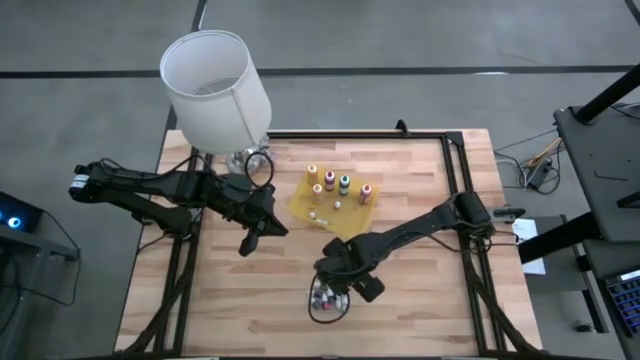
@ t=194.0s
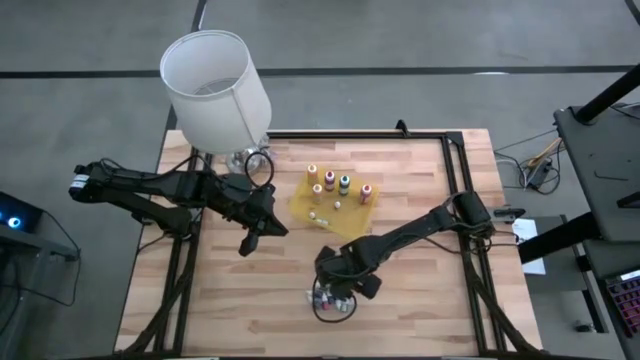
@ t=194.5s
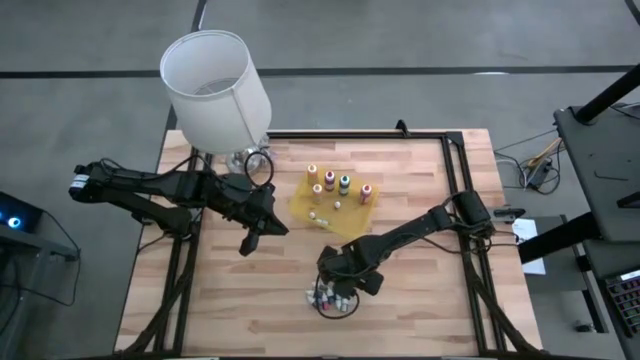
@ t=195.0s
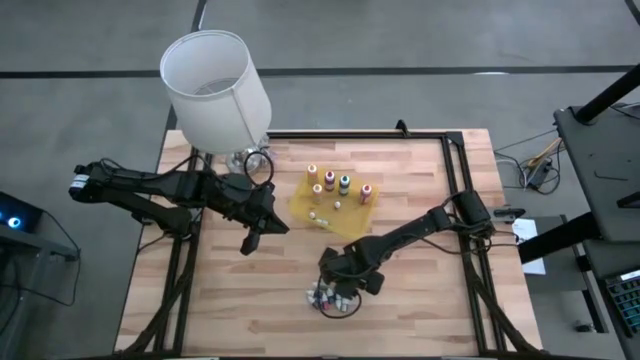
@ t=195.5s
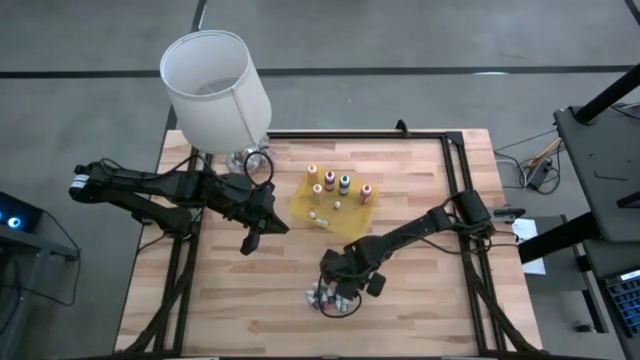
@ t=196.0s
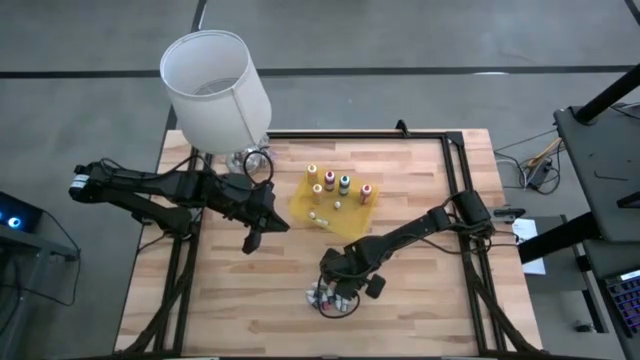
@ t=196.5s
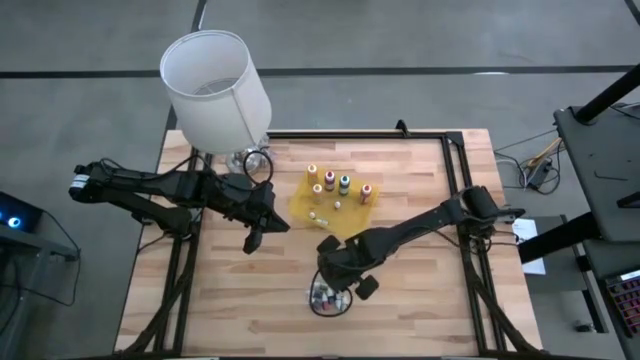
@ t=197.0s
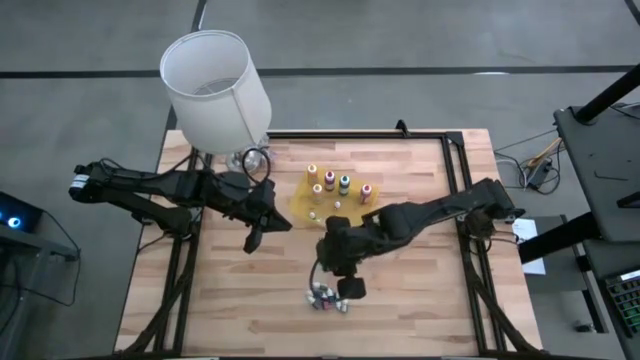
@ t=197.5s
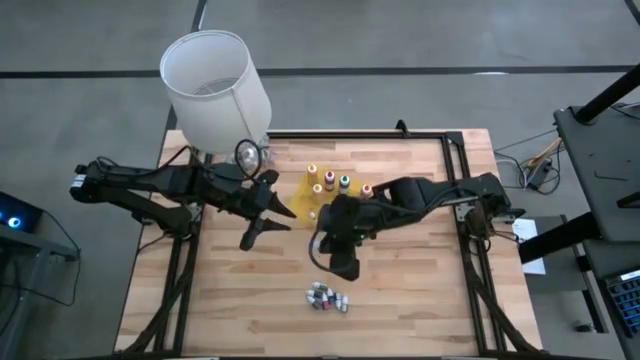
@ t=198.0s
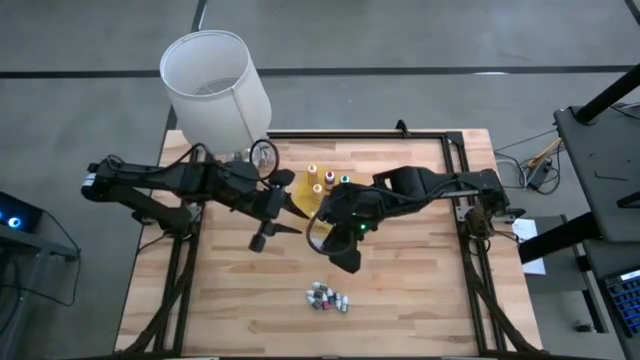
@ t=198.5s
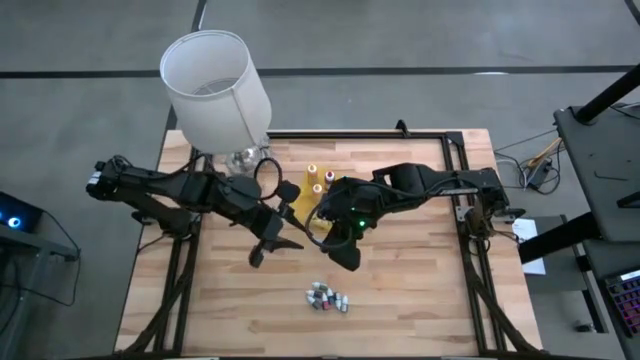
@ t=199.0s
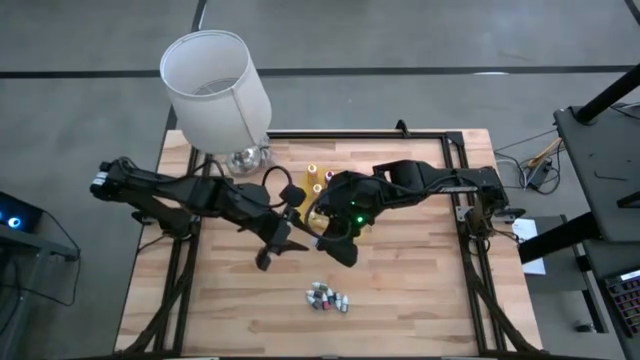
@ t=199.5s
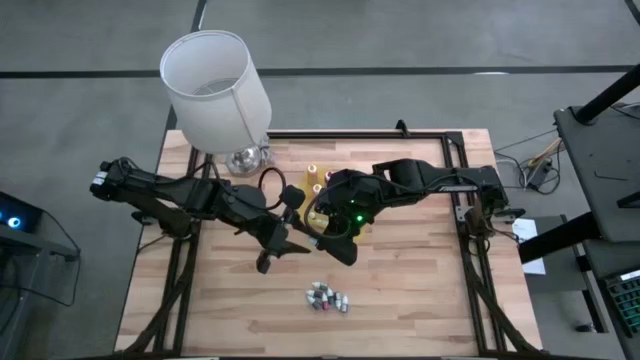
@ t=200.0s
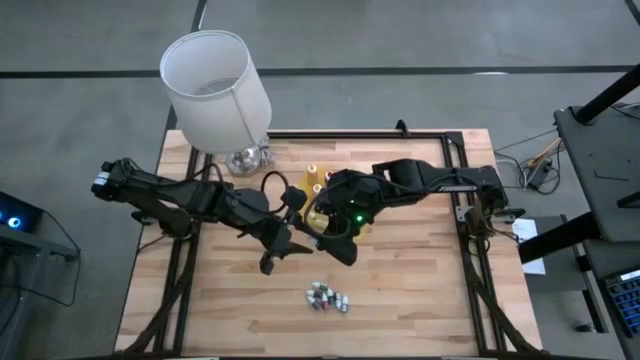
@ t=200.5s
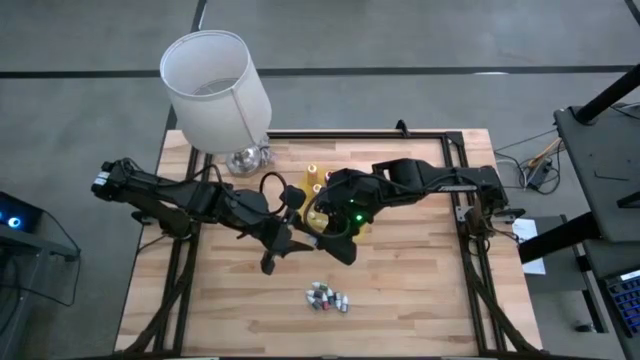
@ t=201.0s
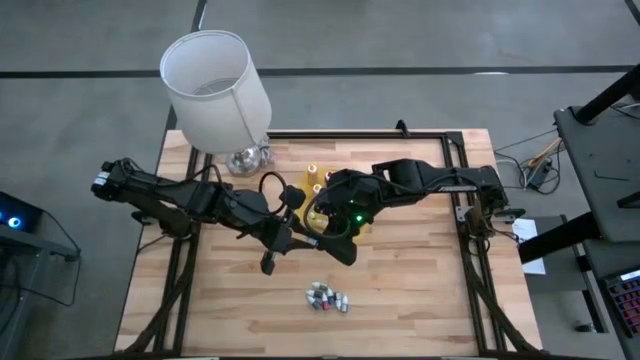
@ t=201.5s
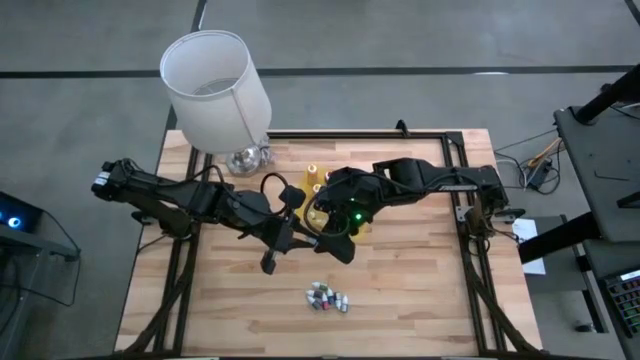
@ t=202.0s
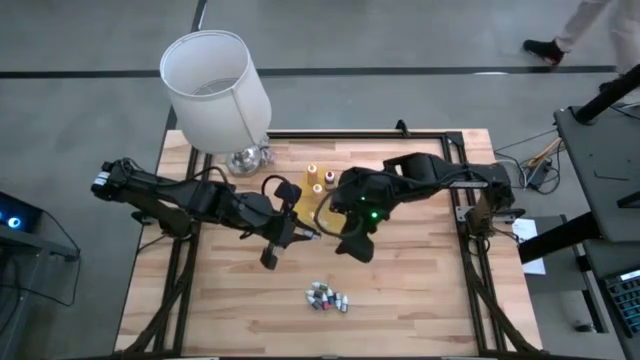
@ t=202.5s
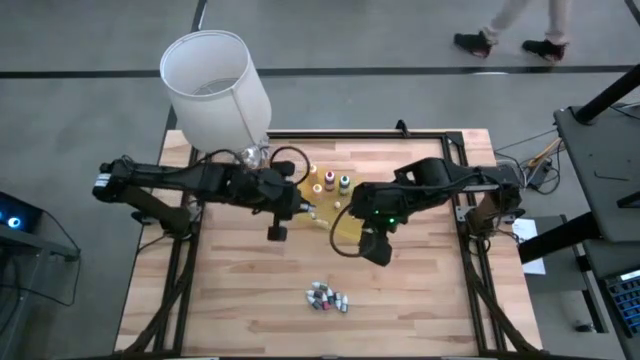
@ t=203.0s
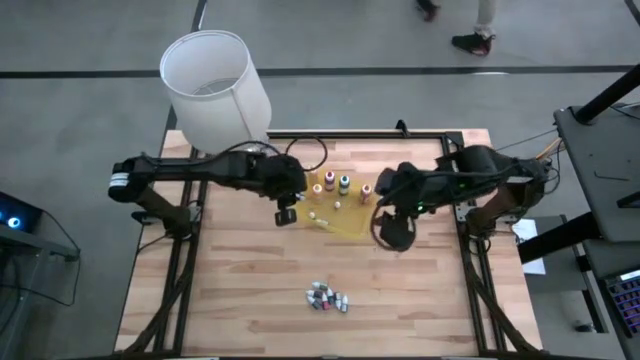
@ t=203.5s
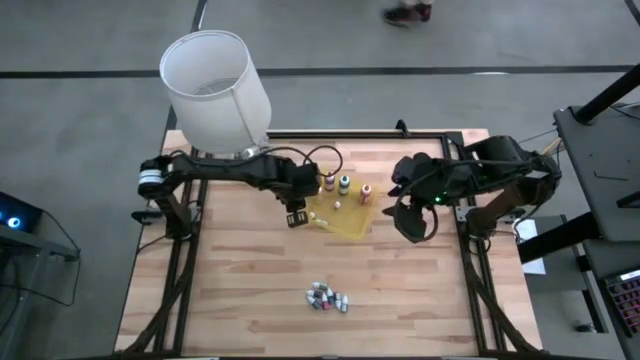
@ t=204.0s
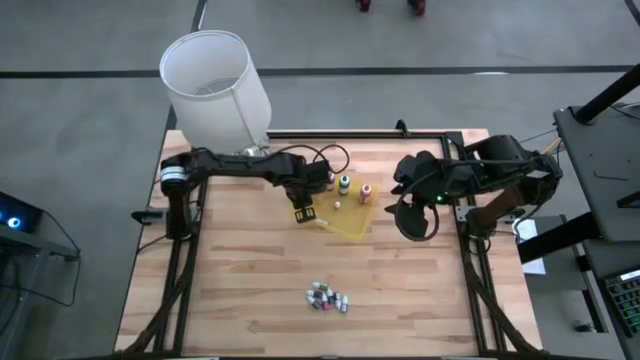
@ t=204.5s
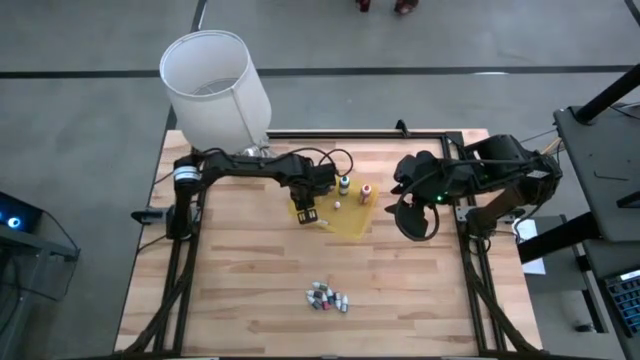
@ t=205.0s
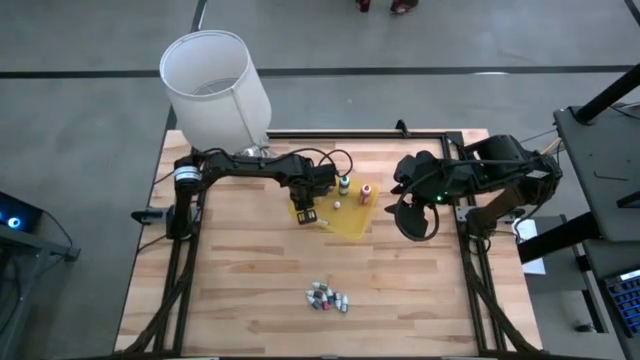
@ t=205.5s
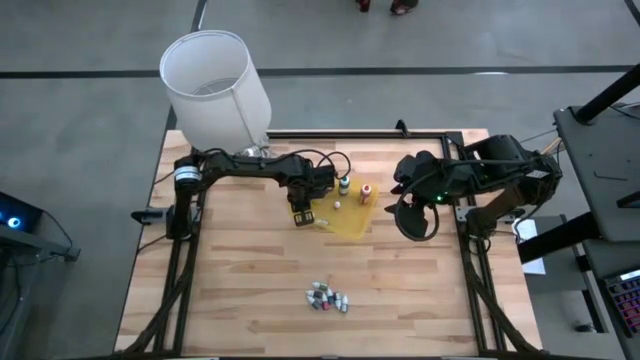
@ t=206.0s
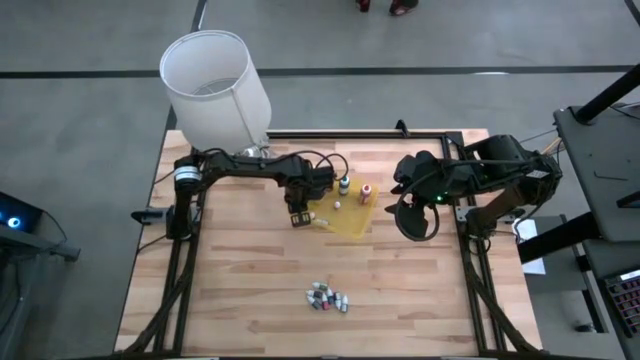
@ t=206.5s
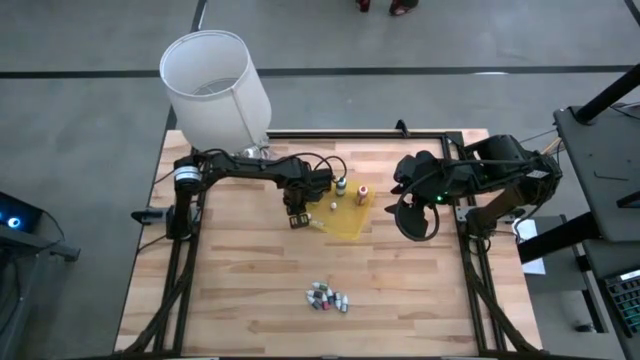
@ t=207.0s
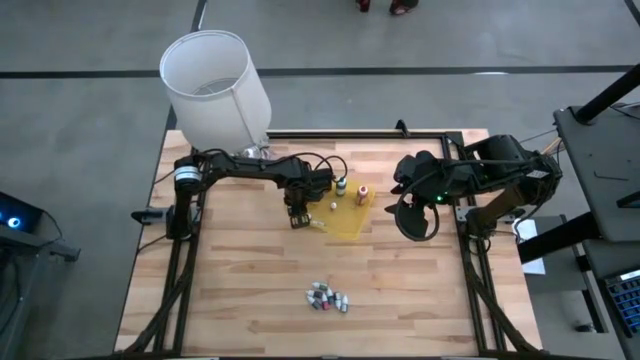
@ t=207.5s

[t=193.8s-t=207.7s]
Task: Pick & Place food coloring
Put the small purple food coloring bottle into the yellow bin

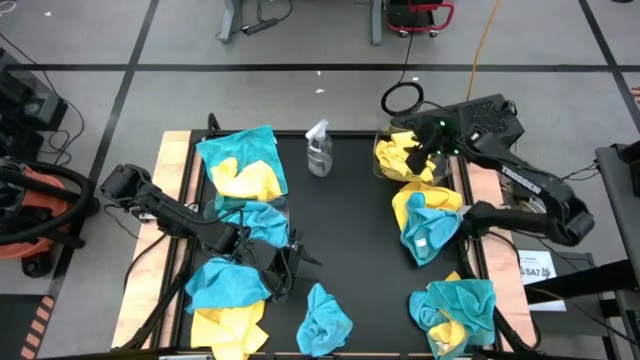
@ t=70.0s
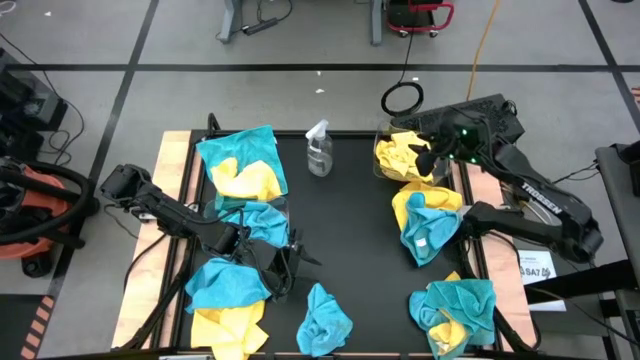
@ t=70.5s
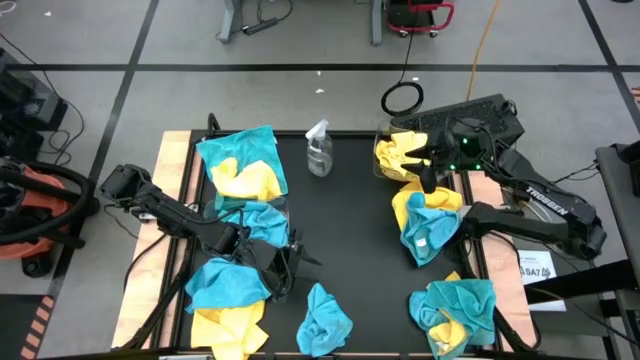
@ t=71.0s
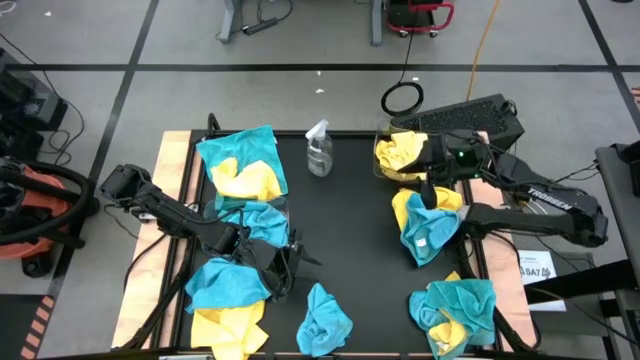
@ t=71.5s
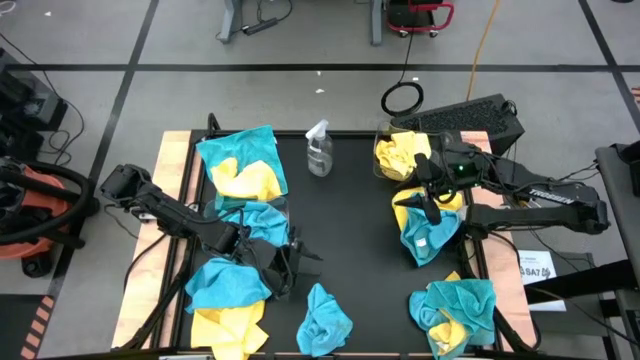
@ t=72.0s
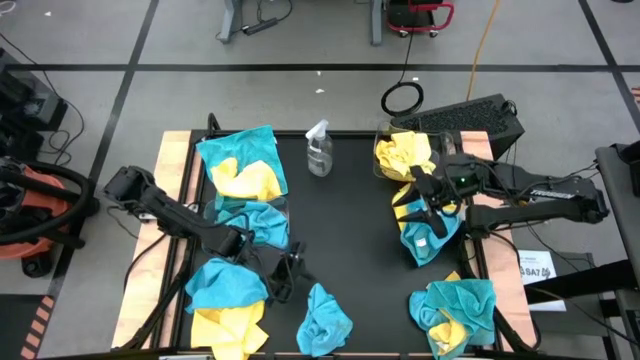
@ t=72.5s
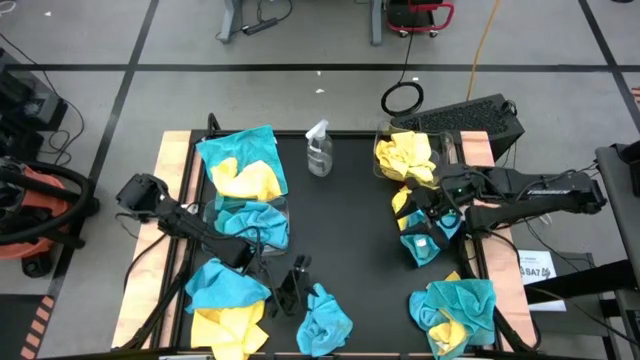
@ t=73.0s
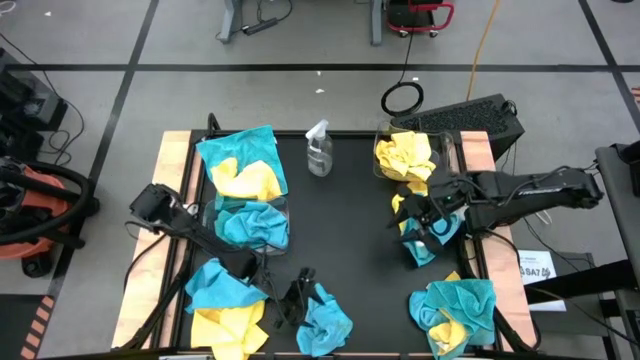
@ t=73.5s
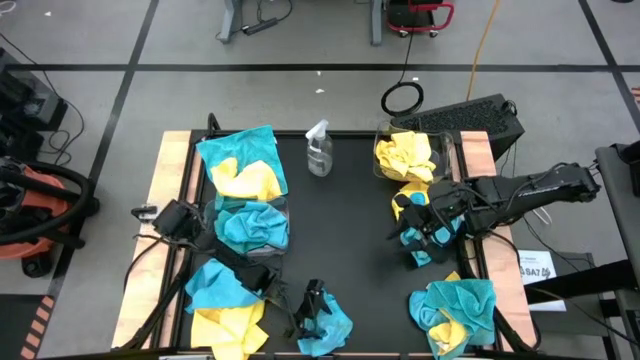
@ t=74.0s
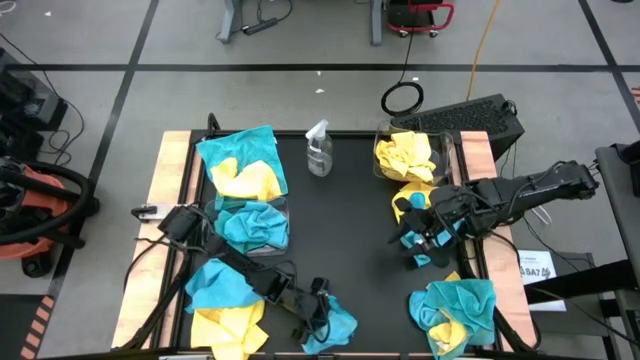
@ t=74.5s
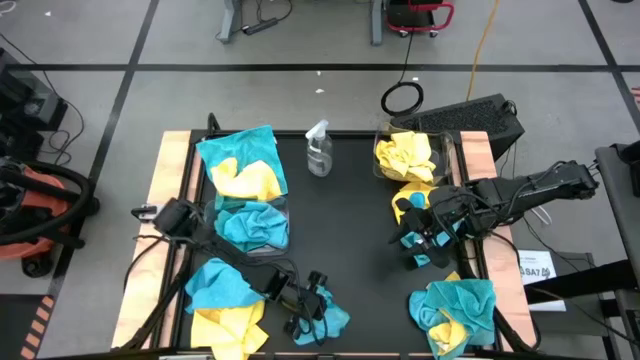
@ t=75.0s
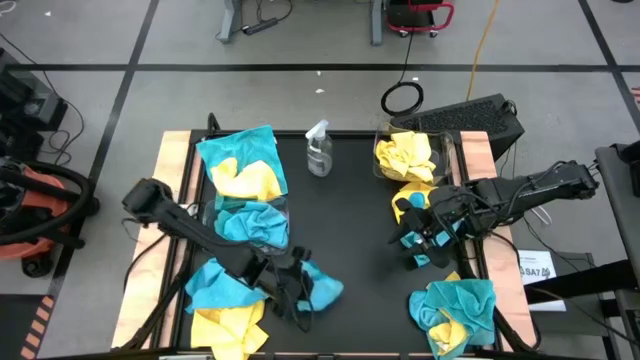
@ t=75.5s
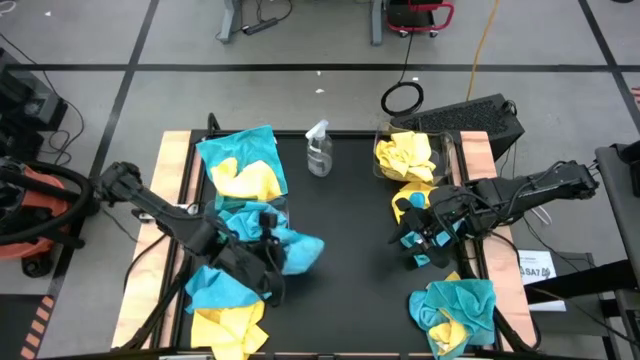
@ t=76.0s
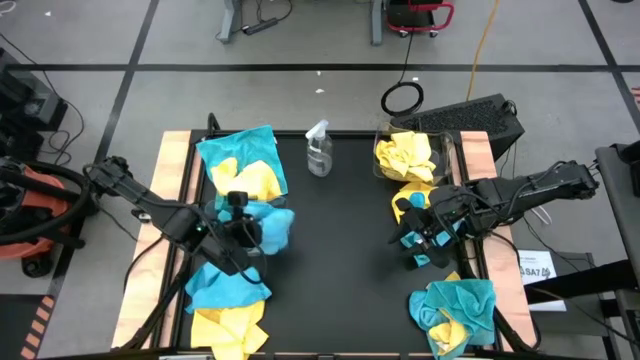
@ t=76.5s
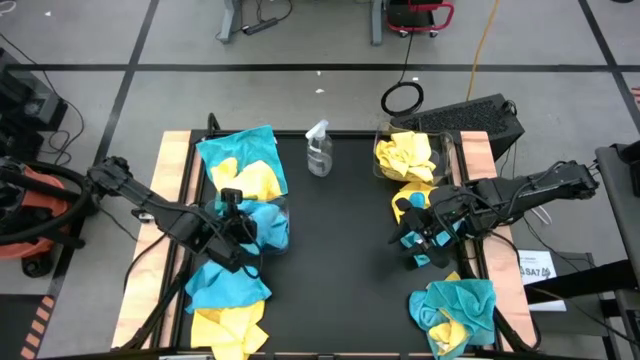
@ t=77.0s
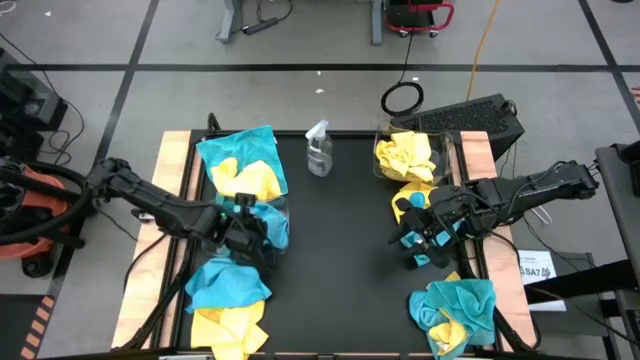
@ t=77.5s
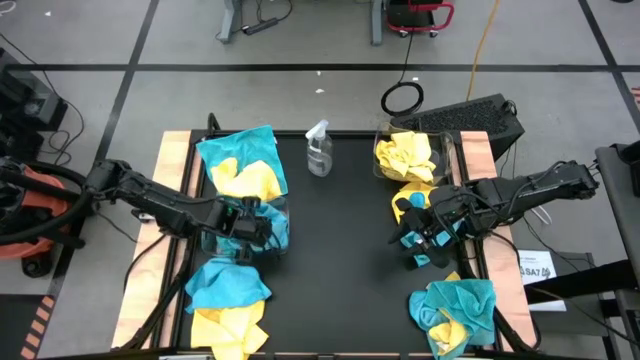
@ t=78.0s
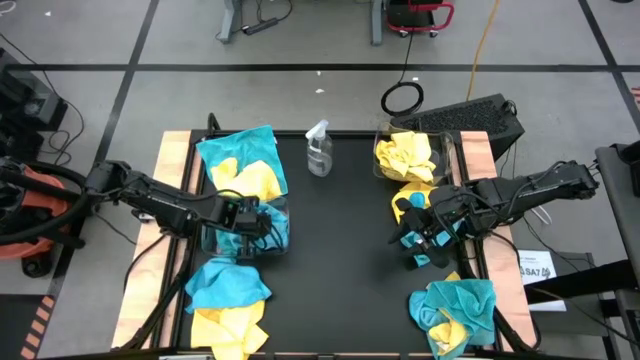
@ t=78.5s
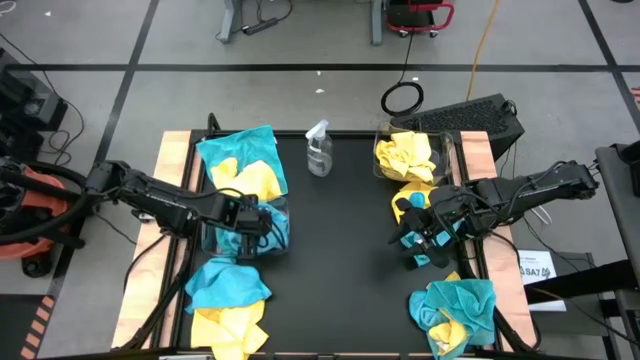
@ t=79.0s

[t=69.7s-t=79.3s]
Task: Sort microfiber towel by color & place in baskets
Put the blue towel into the bottom transparent bin
